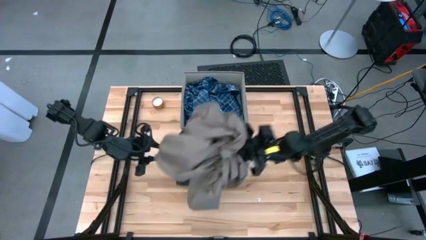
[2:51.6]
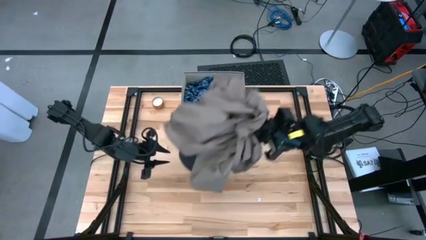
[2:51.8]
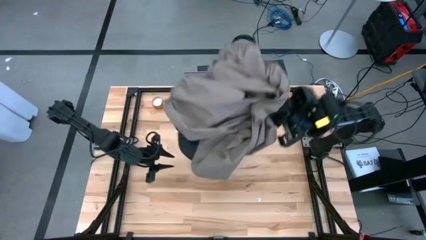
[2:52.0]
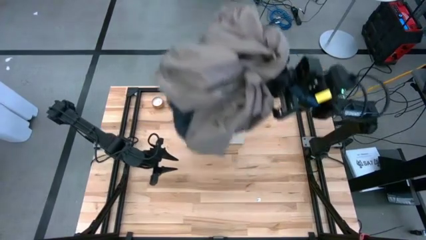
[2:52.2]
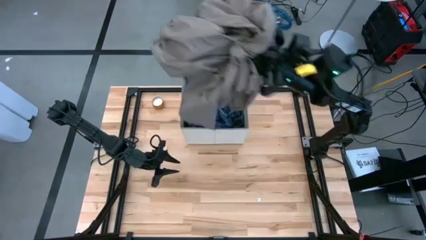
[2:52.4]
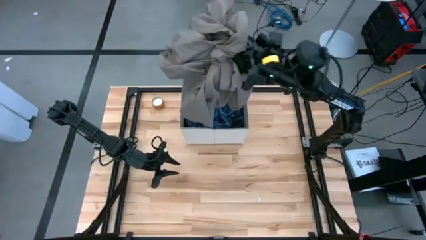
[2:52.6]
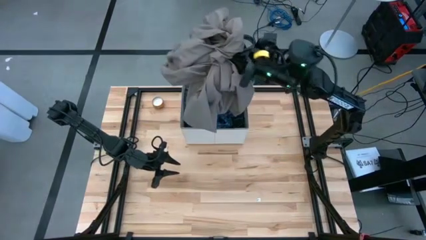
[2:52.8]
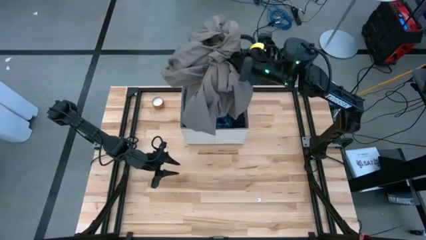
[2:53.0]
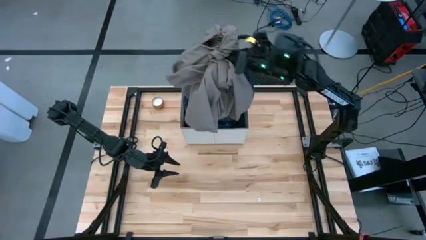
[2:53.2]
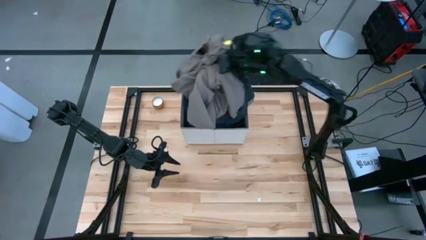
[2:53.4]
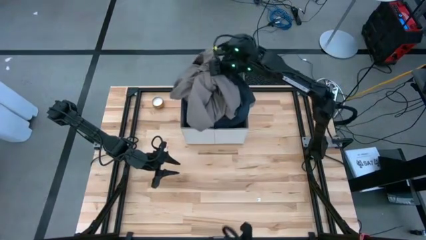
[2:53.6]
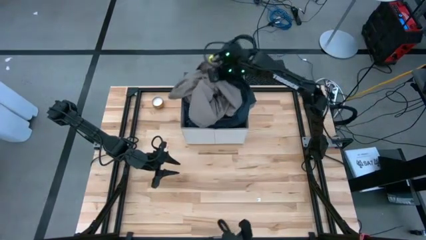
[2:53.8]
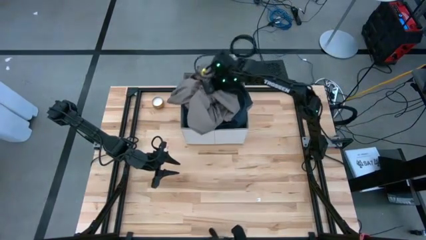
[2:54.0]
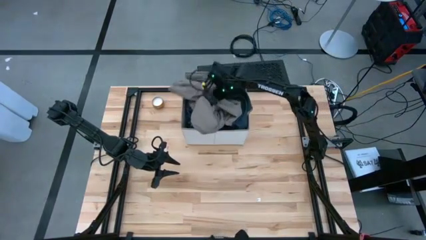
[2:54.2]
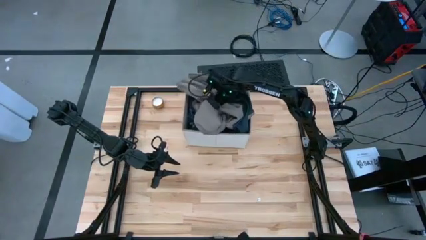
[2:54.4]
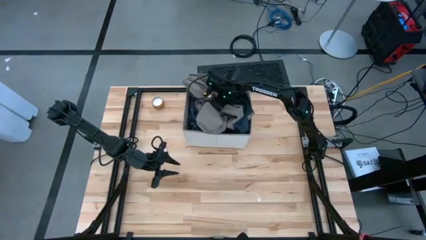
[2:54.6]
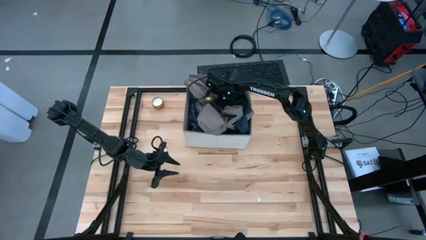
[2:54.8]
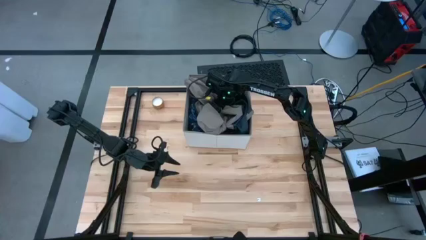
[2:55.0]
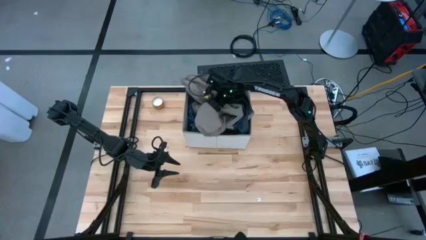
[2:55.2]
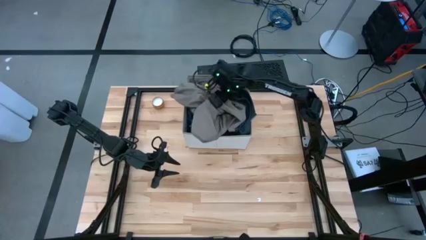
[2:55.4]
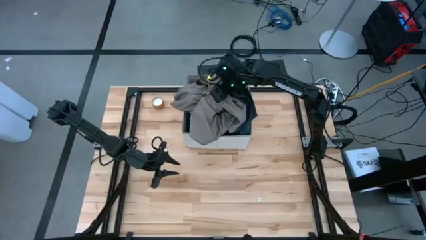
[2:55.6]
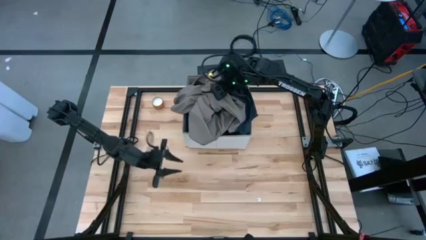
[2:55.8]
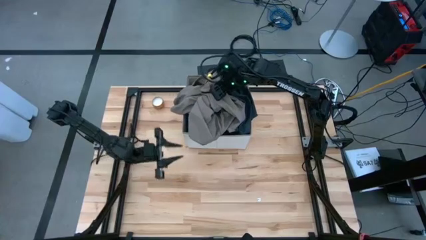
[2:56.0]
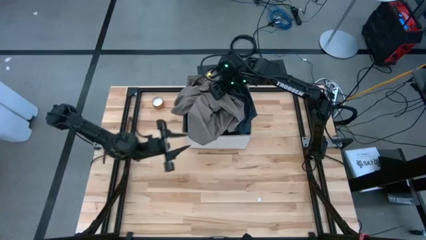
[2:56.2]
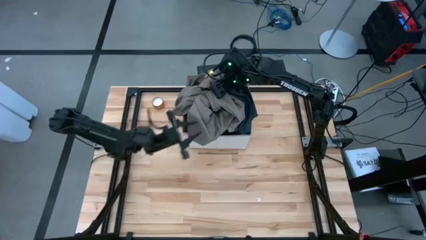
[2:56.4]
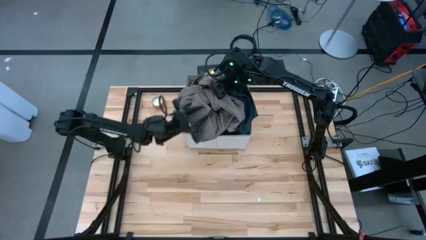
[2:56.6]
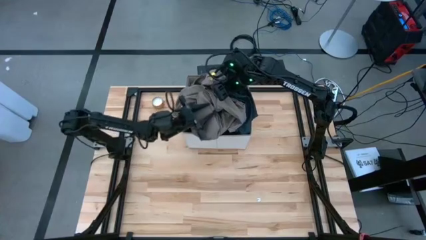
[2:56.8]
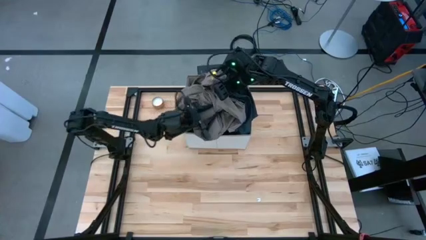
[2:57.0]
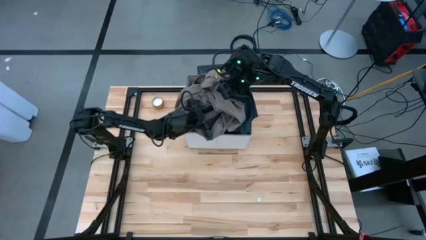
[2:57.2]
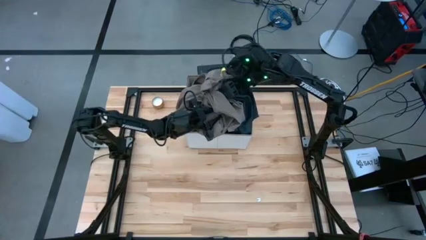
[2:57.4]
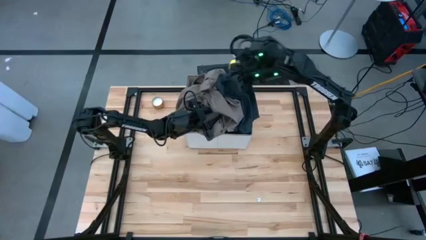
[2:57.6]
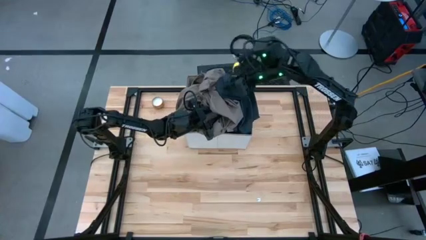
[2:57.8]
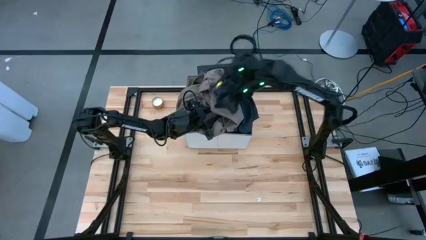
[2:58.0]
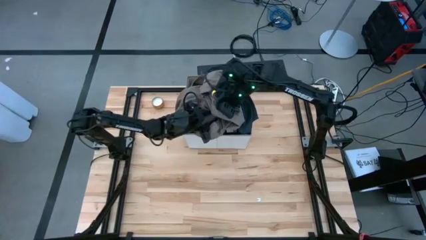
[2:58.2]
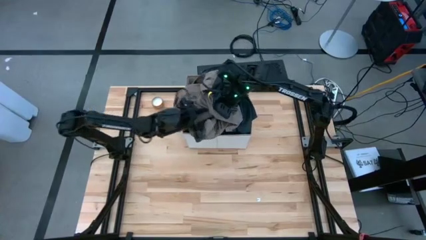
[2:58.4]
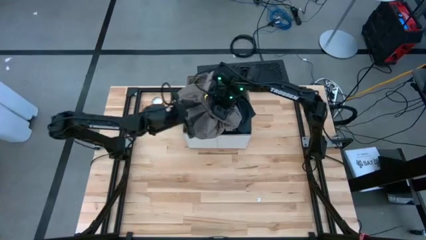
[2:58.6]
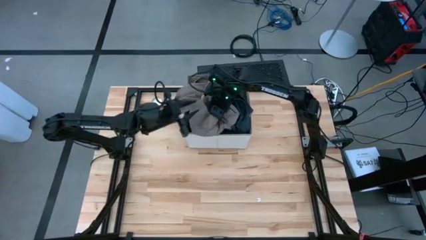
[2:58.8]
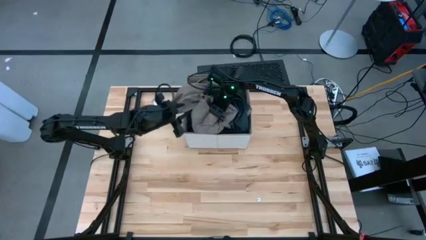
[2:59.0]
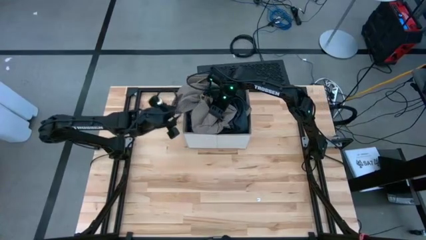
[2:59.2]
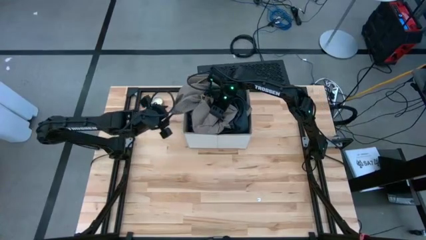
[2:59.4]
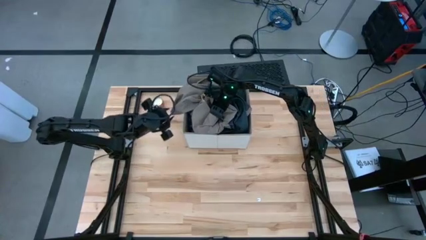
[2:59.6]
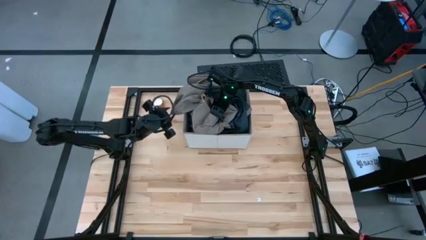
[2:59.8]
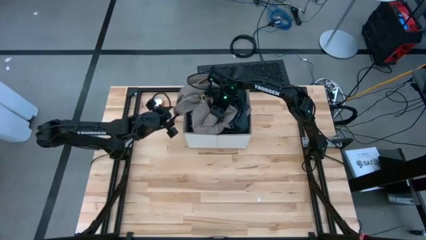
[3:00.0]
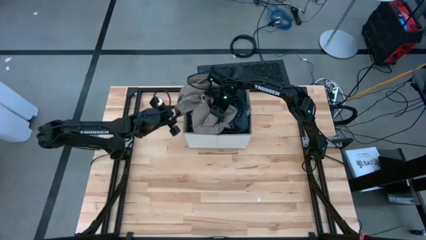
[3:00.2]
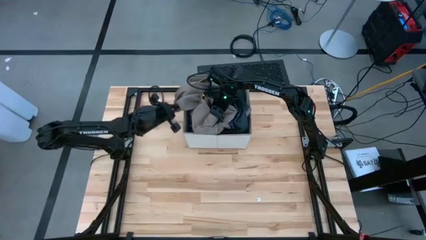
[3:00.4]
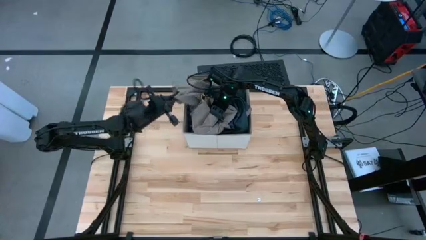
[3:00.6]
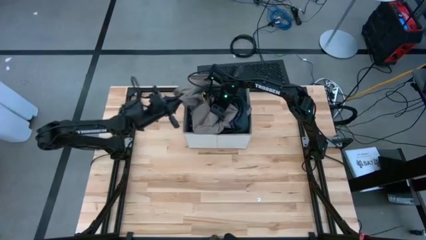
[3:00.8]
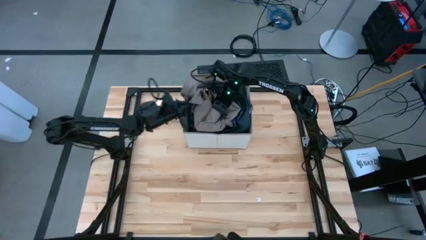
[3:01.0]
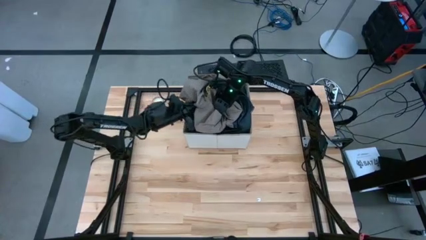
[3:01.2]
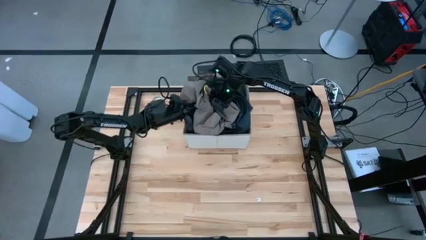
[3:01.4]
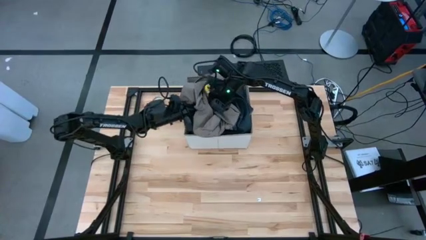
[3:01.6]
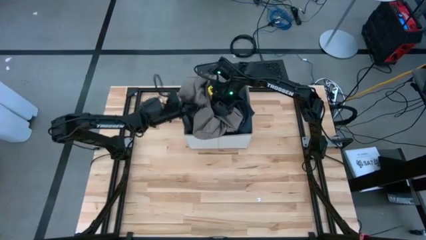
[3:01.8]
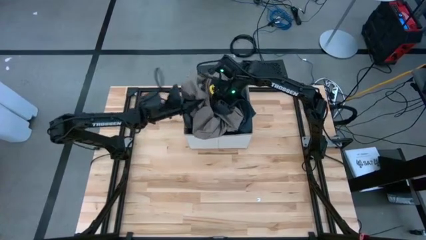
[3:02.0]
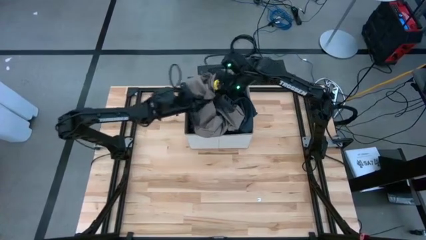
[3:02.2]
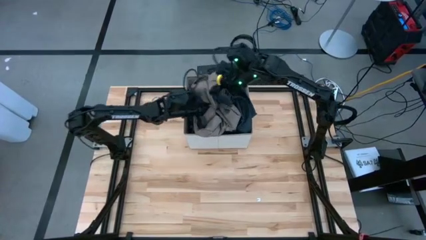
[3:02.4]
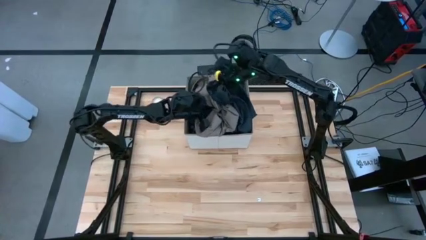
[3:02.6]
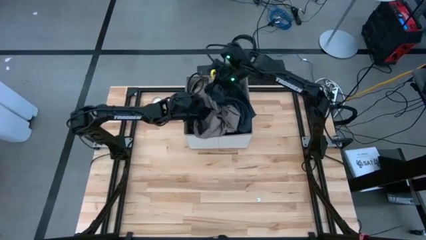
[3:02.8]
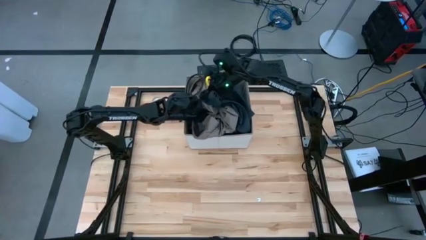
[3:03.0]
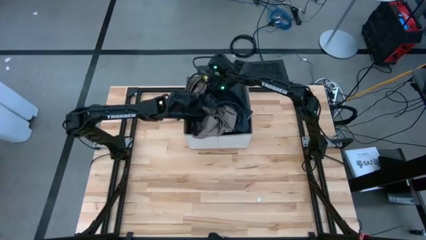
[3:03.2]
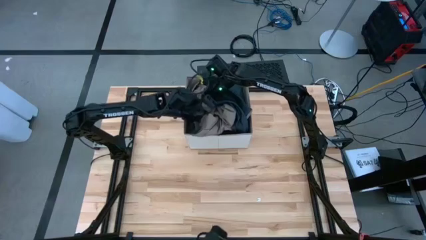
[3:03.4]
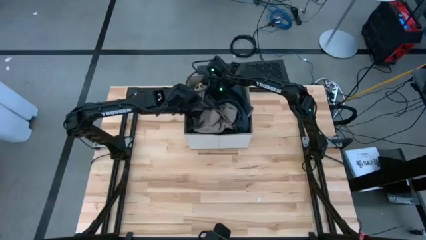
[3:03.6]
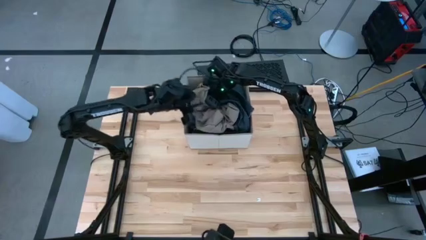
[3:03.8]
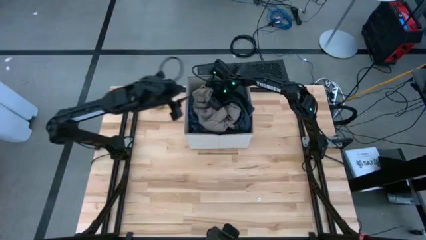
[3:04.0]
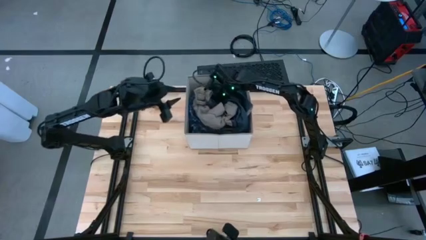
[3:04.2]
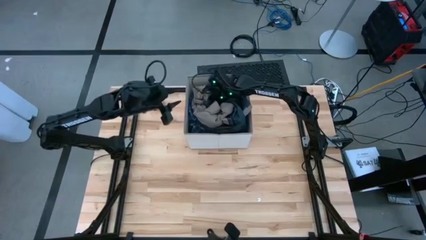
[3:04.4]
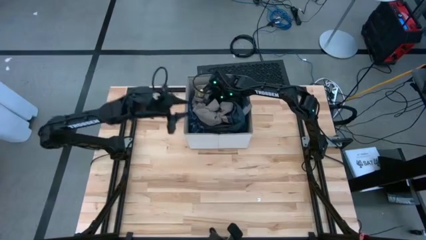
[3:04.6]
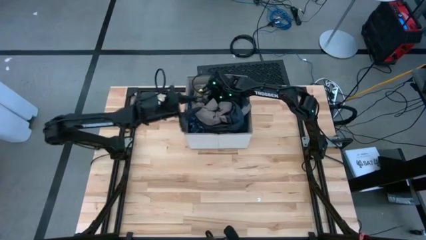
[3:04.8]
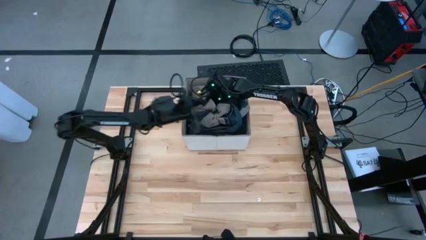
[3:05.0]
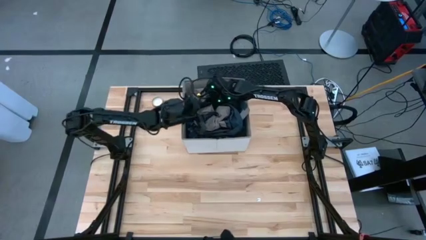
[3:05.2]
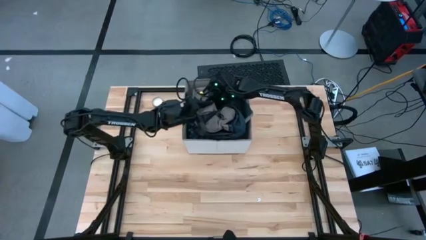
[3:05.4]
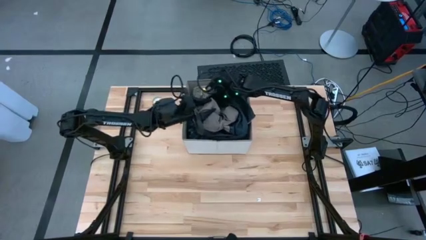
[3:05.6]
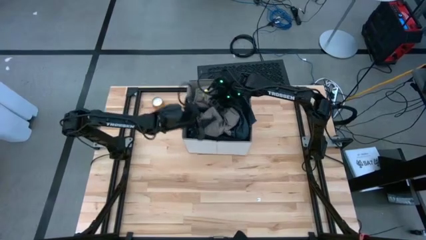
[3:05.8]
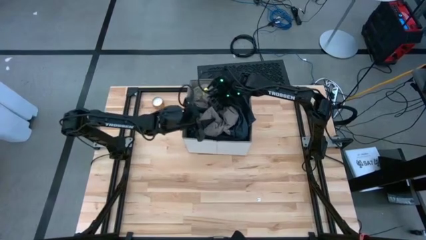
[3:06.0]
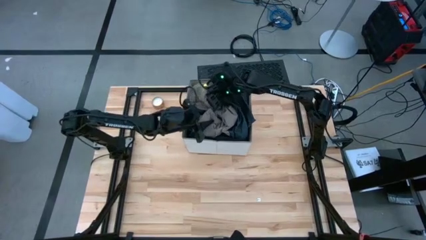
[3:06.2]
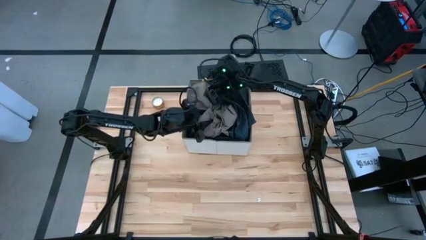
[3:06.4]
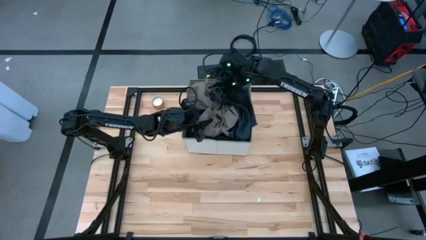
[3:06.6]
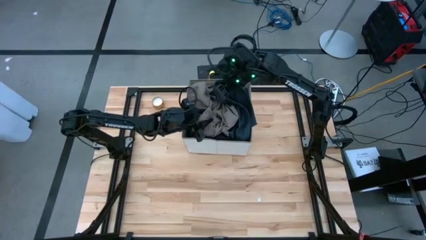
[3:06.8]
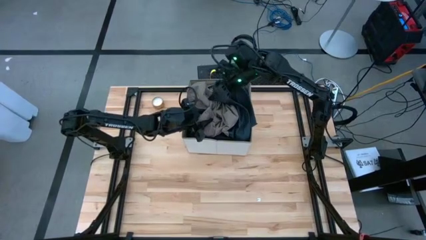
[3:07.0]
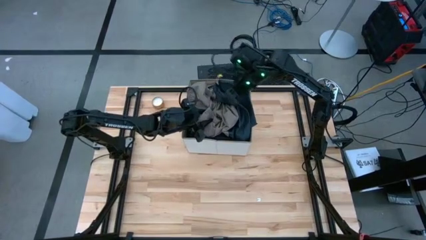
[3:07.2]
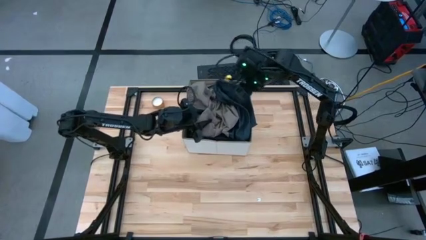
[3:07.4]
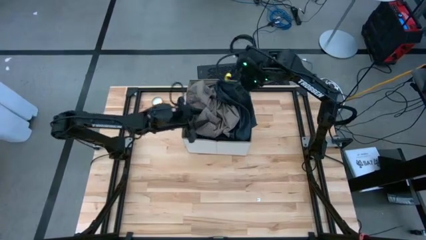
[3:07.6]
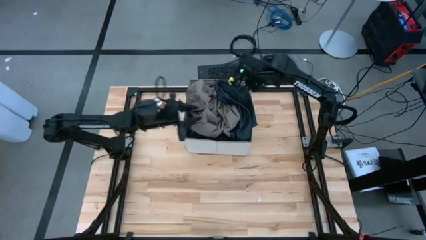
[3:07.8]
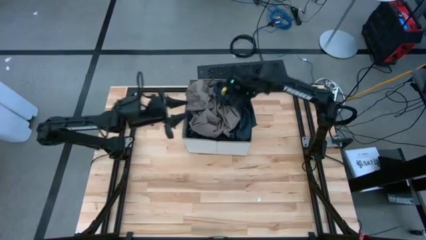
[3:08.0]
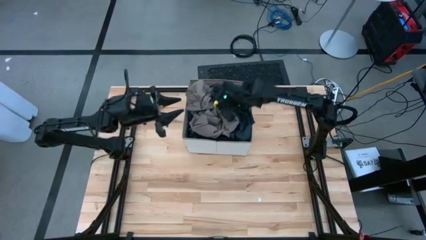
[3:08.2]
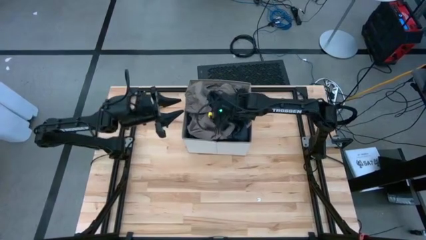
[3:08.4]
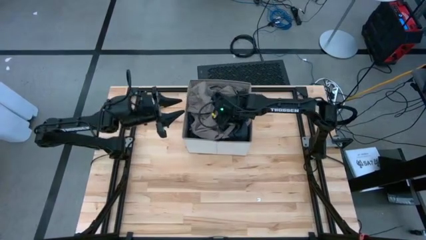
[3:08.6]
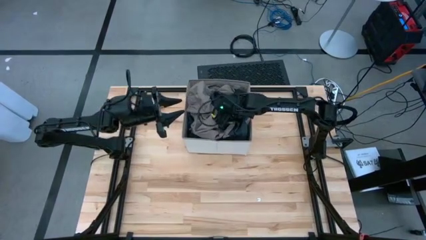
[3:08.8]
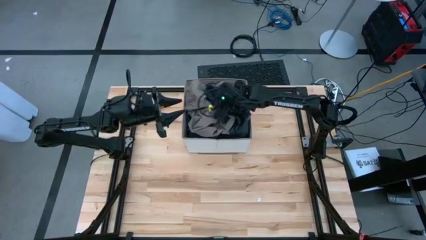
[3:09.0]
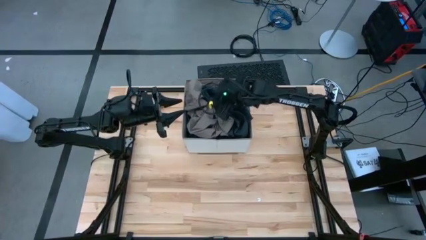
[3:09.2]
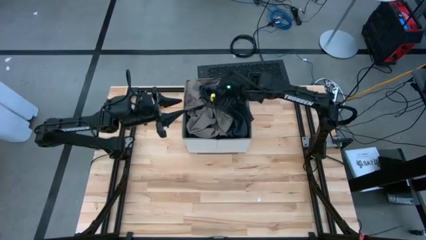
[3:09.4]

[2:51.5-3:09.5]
Task: Sort clothes
Put the brown jacket into the laundry bin
